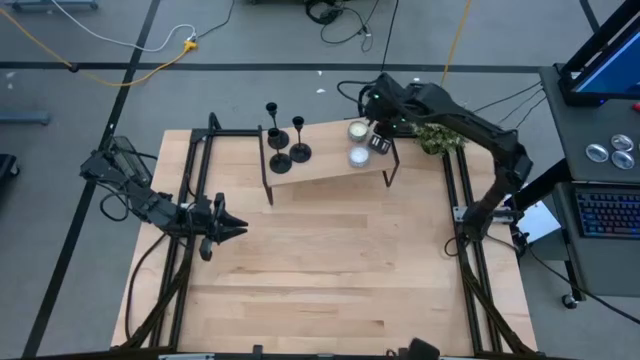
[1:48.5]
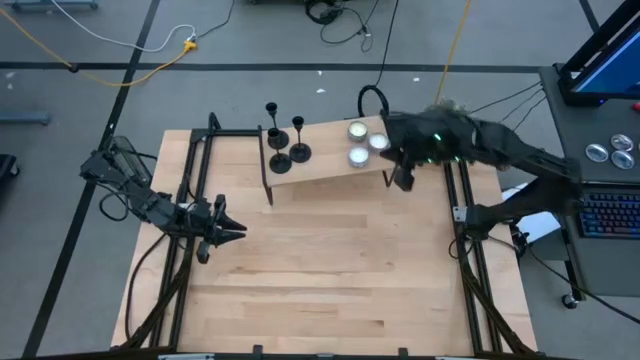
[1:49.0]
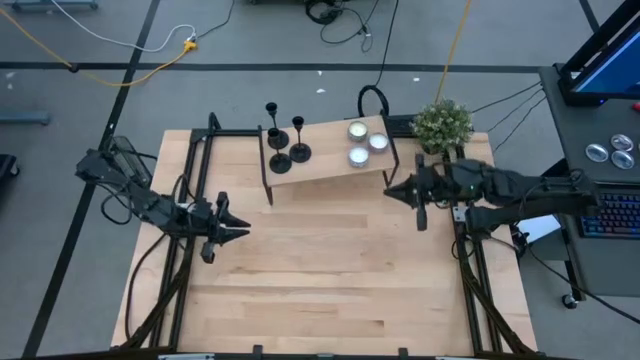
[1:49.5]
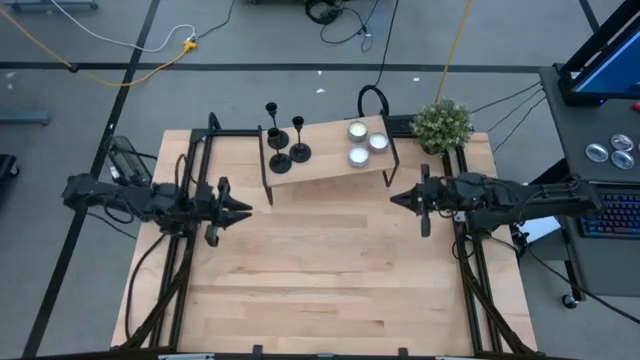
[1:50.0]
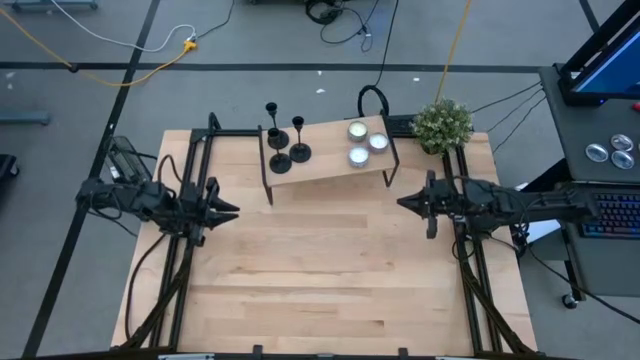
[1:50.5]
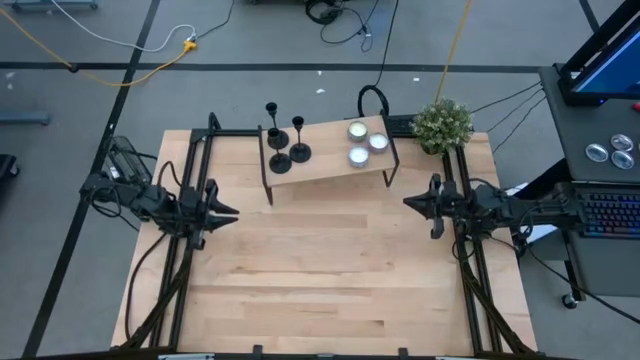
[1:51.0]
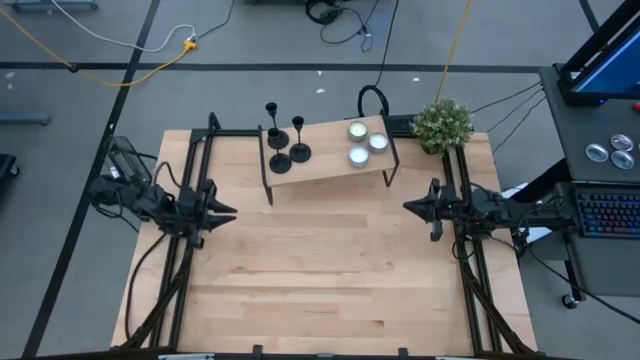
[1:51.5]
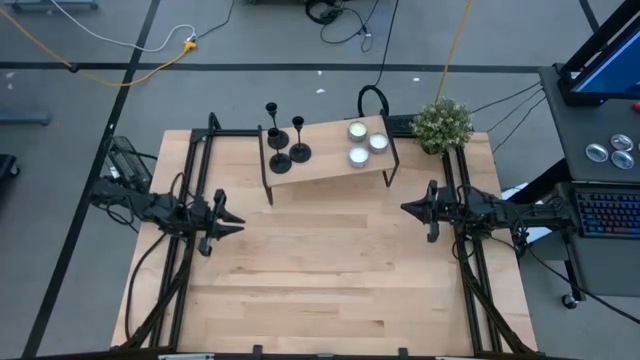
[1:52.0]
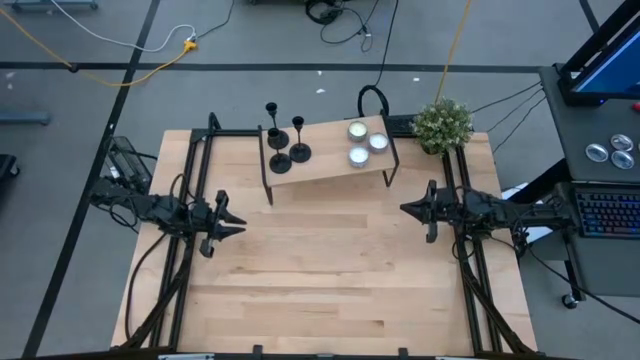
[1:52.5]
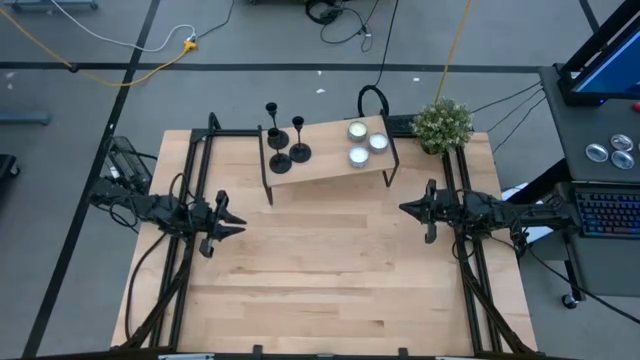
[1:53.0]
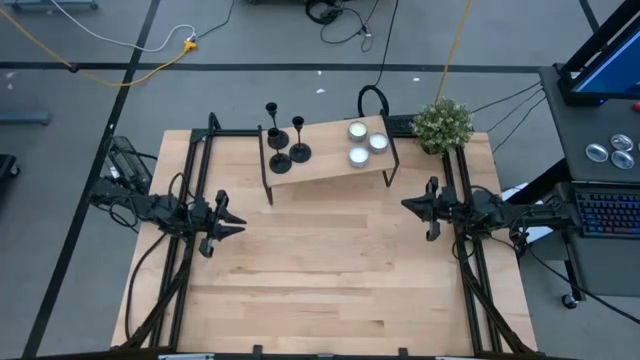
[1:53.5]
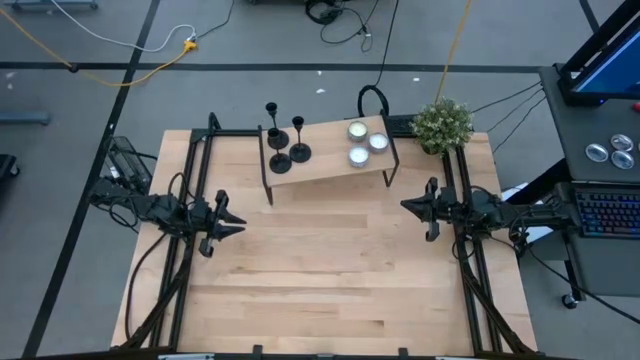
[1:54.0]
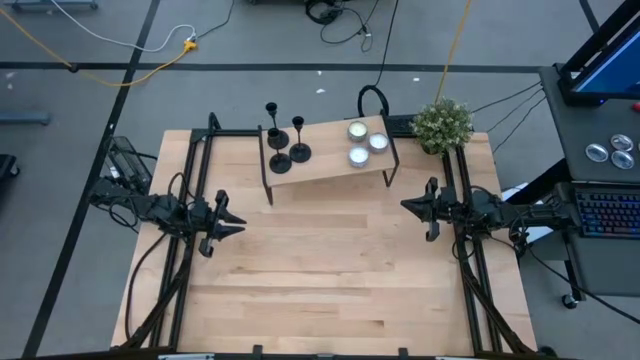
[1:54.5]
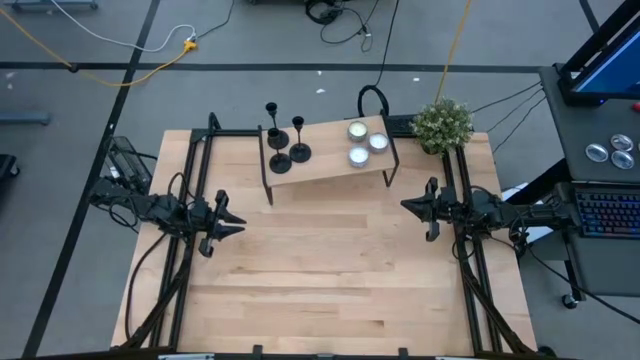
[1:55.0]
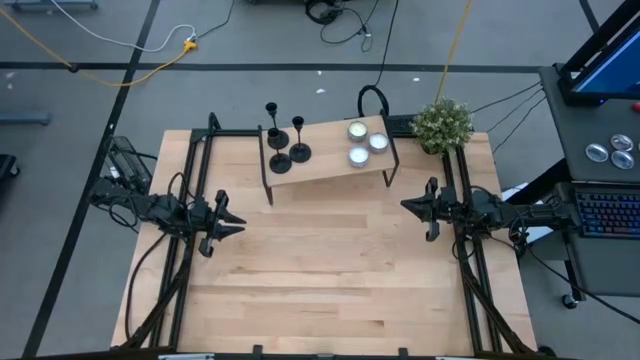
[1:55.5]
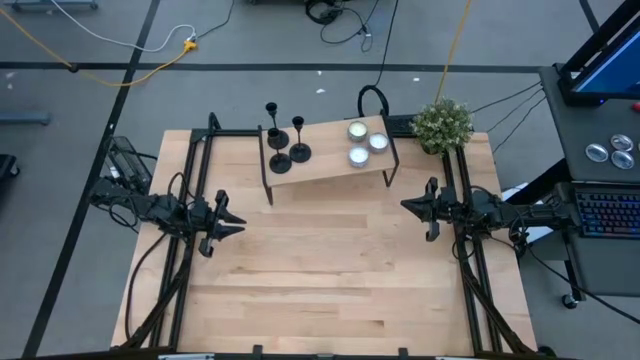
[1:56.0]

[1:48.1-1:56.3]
Task: Pick & Place candle stick holders
Return to Home Position

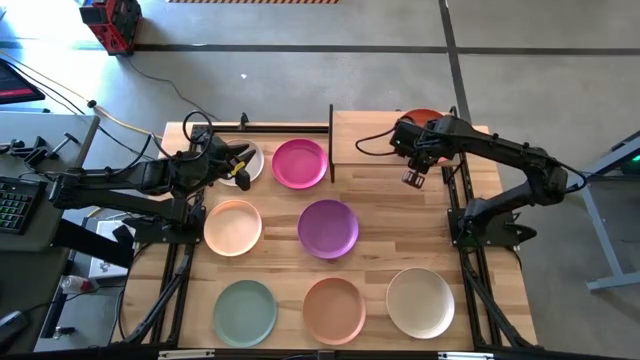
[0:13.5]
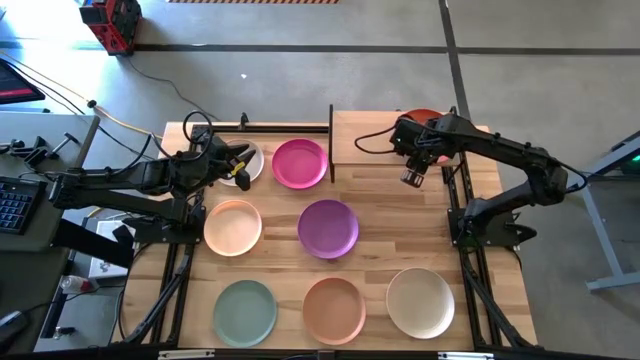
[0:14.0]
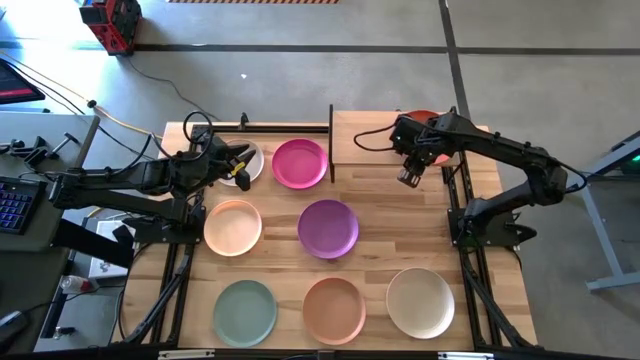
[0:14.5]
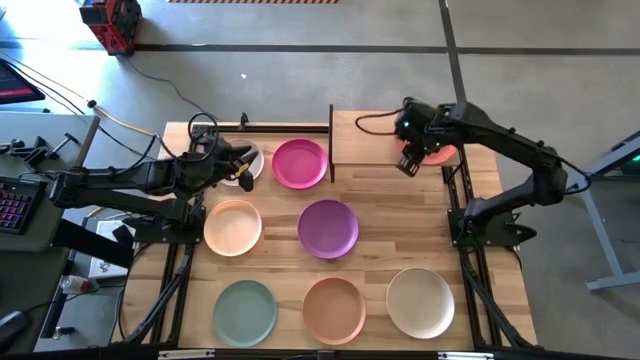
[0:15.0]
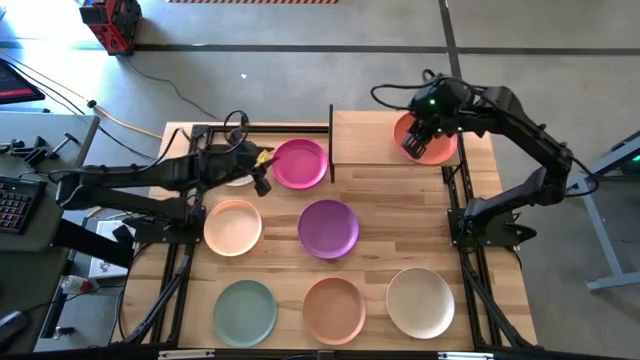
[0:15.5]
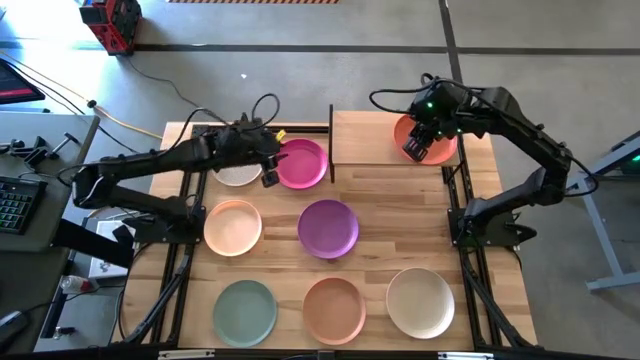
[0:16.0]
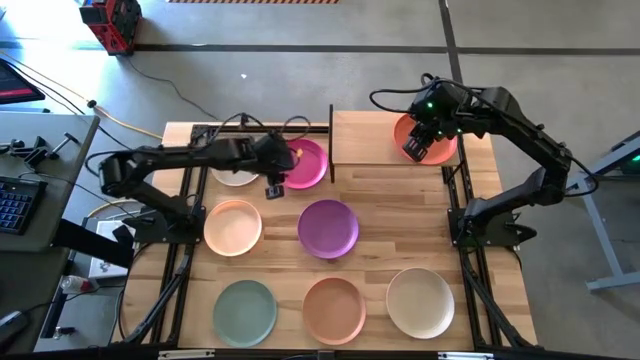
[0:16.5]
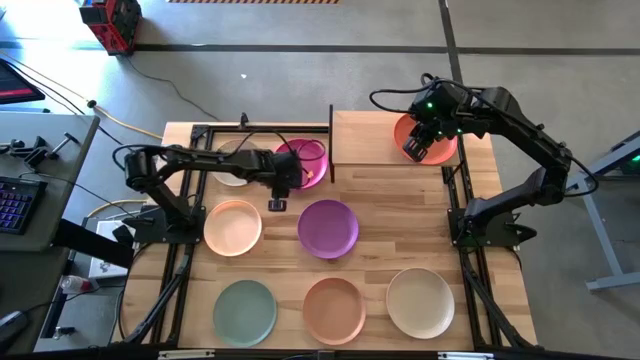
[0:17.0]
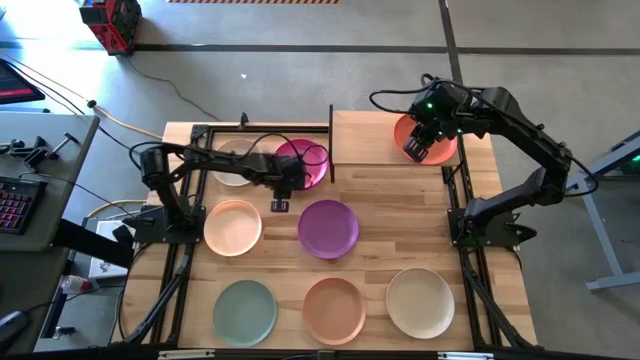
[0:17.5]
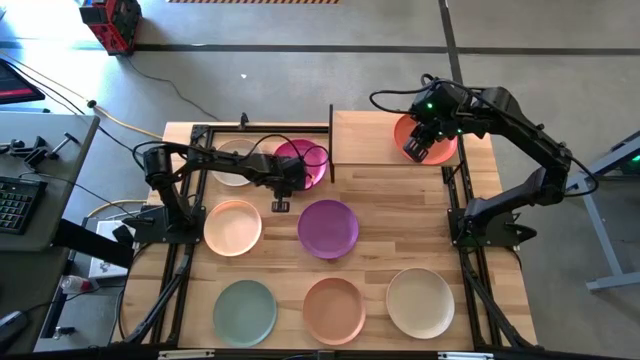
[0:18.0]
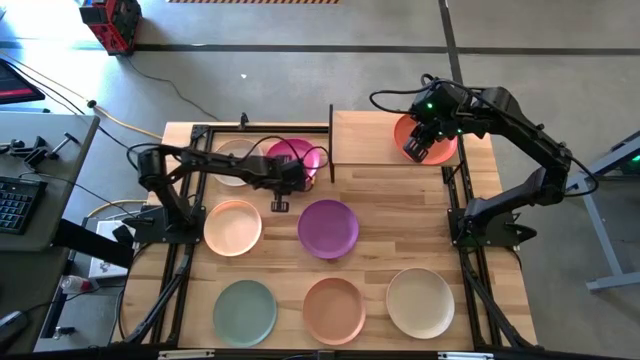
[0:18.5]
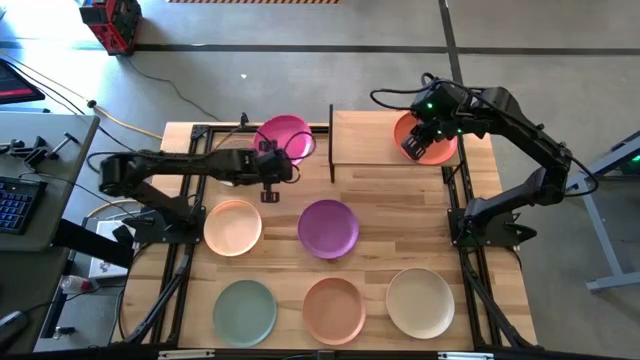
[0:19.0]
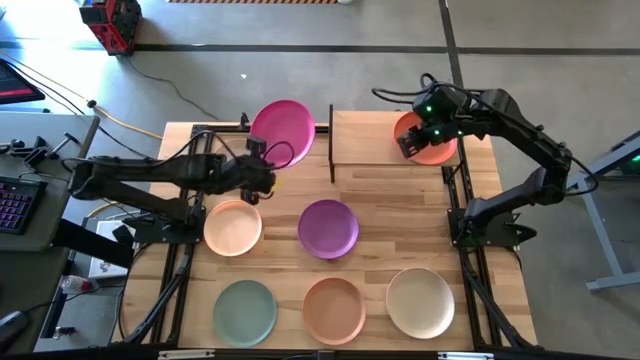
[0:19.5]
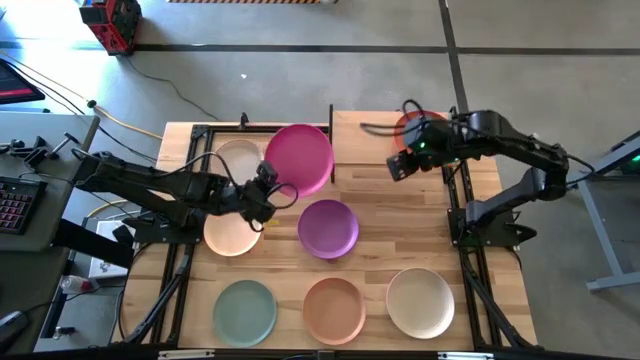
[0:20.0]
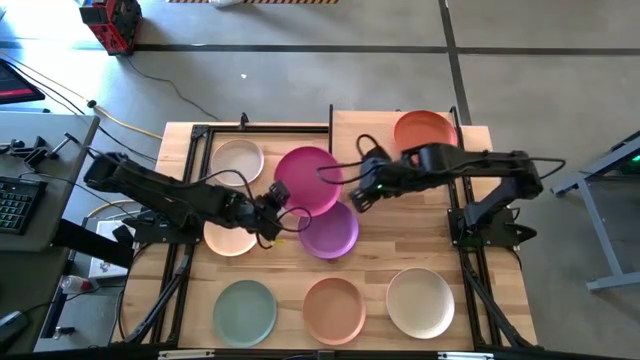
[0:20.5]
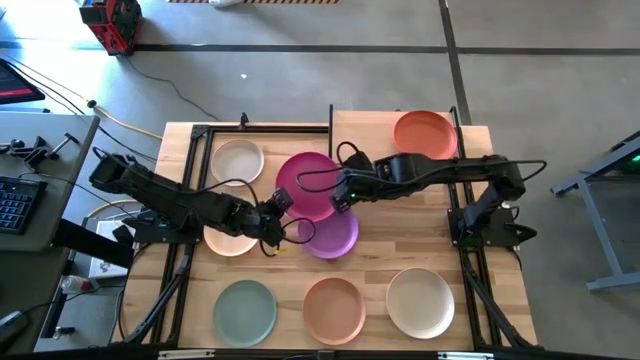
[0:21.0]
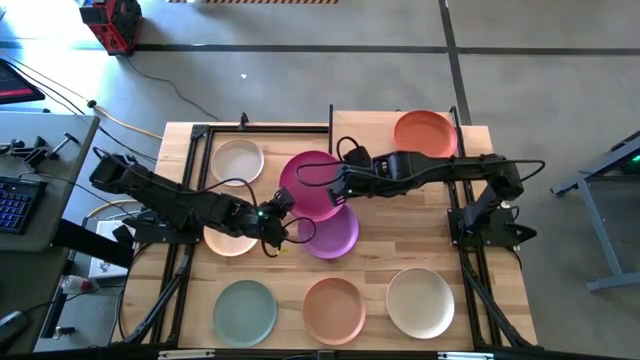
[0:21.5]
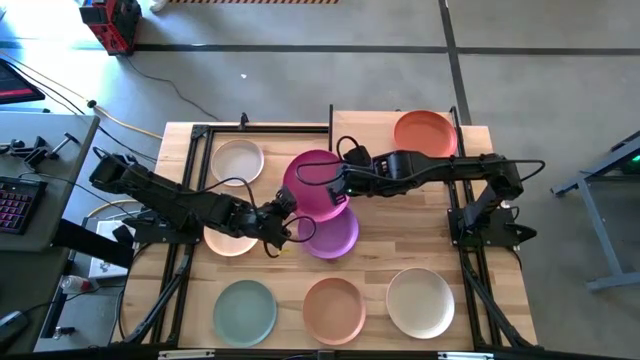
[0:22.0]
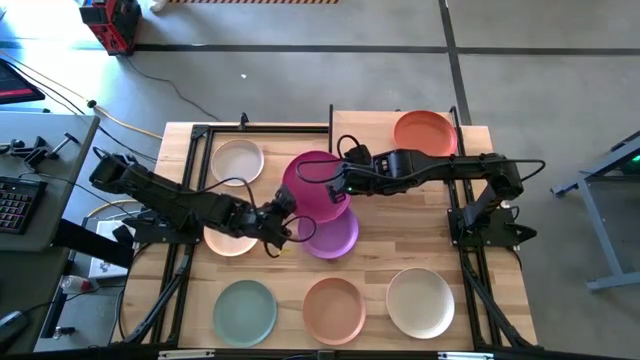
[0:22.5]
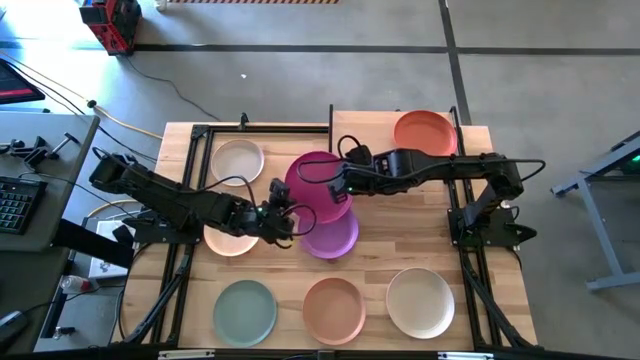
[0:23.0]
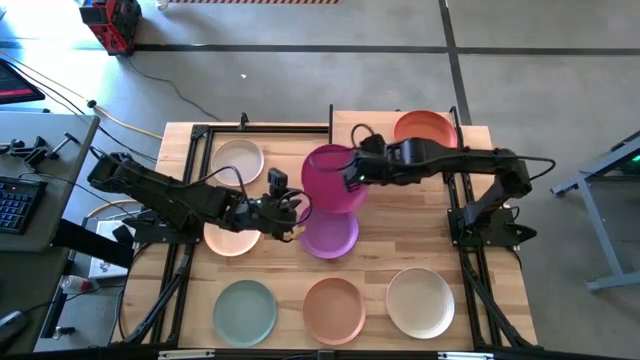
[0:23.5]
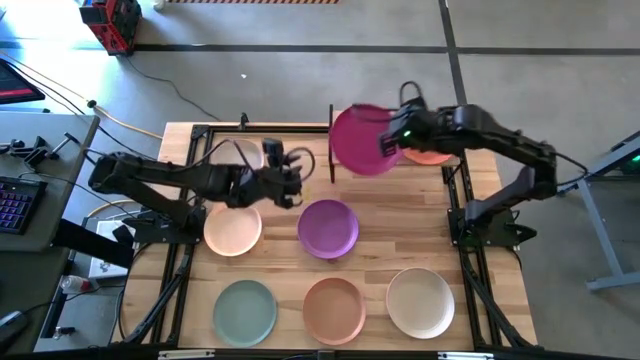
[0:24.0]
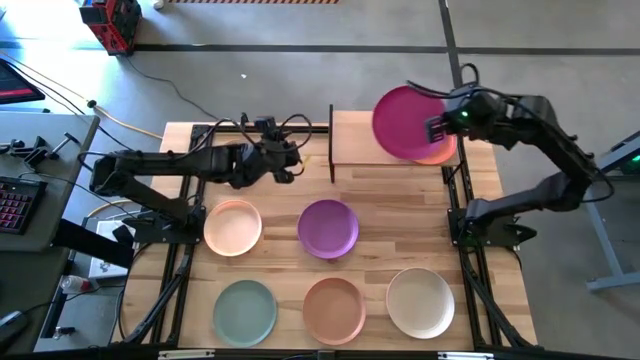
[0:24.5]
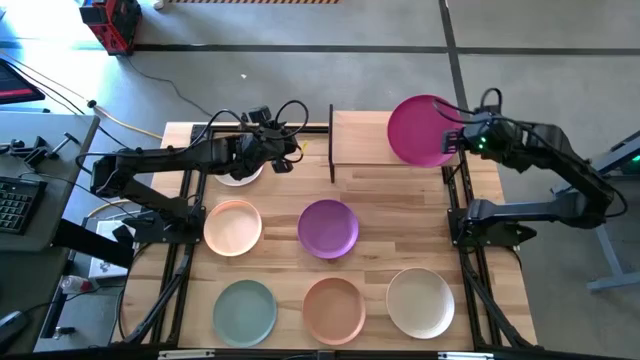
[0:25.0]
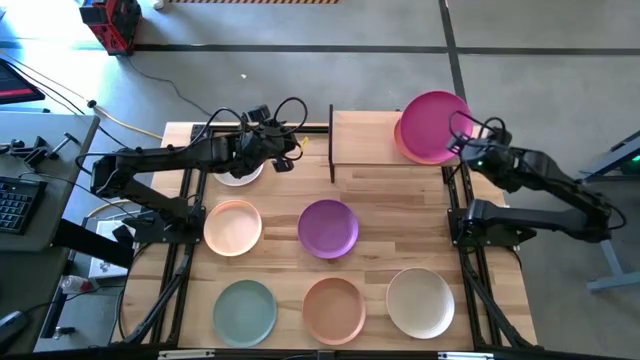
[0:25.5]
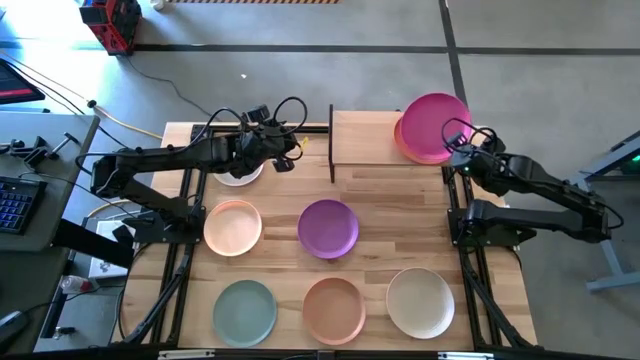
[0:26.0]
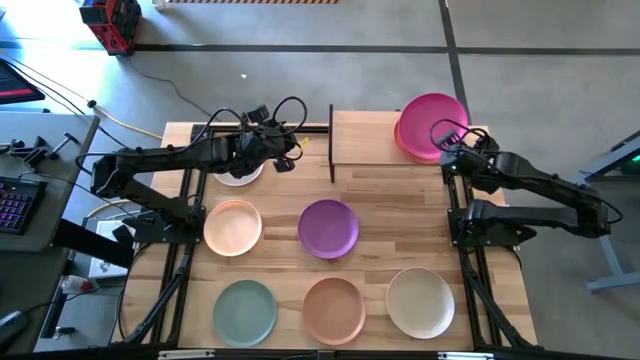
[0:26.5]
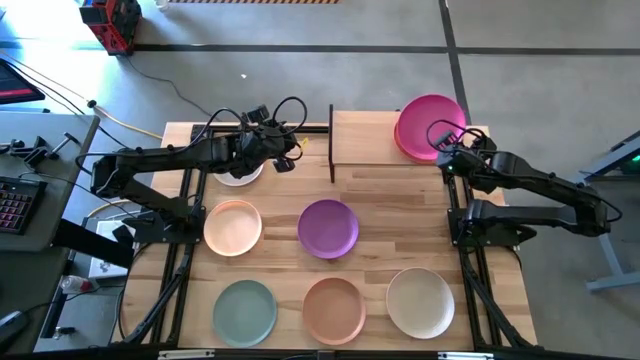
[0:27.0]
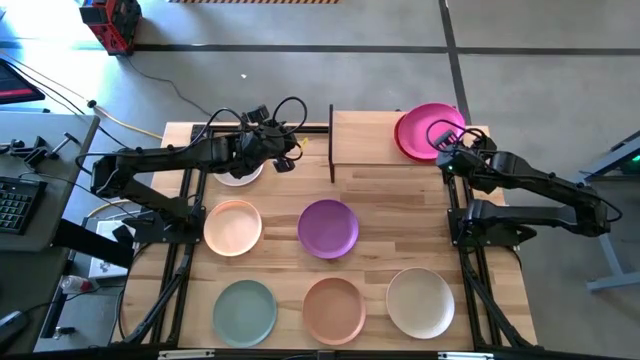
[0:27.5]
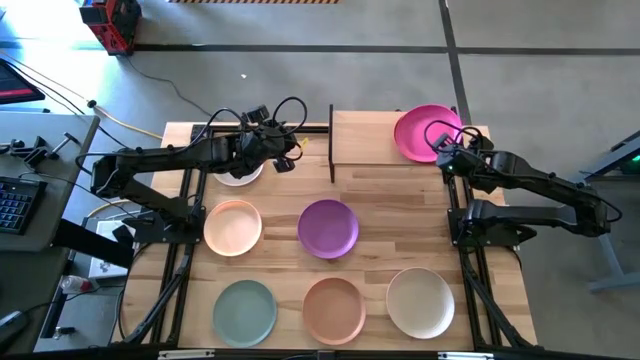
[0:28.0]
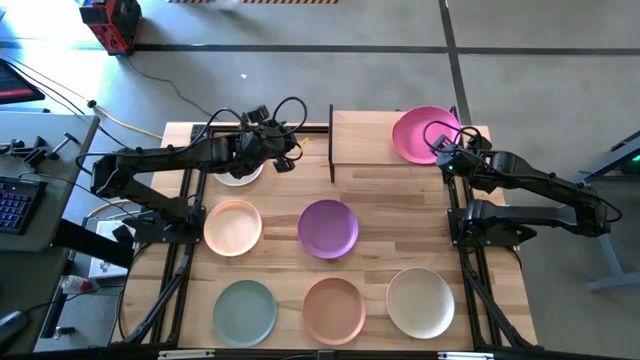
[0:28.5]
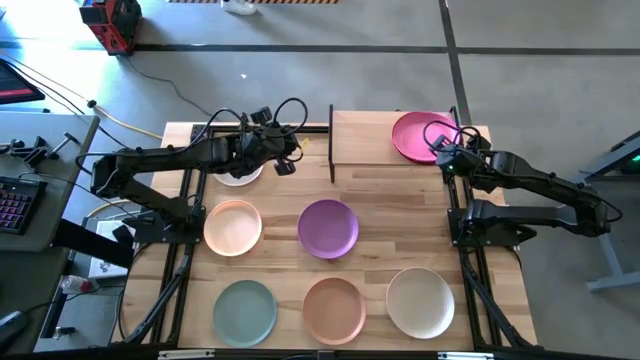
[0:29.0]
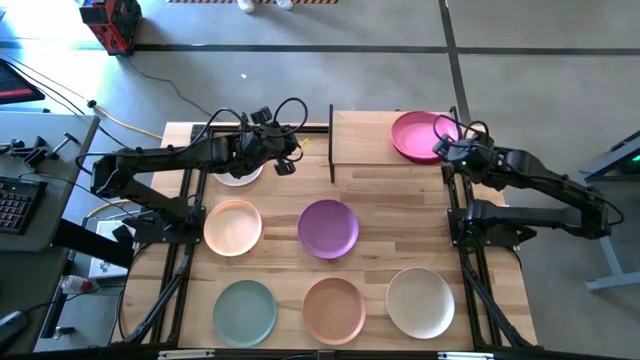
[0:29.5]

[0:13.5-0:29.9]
Task: Place and stack plates onto a shelf
Stack the pink plate on top of the orange plate on the shelf
